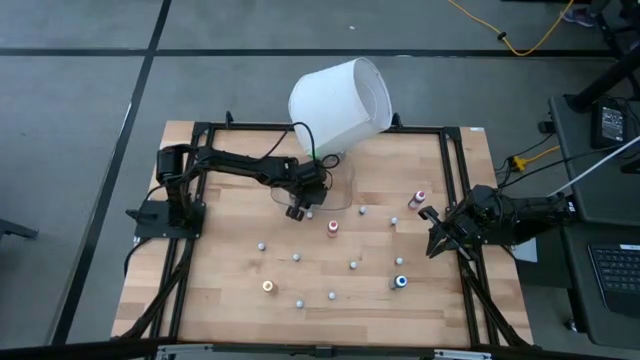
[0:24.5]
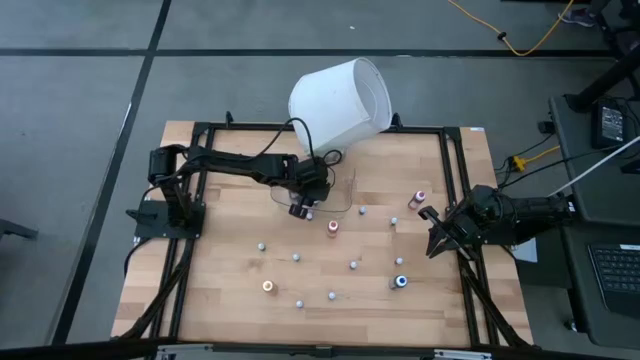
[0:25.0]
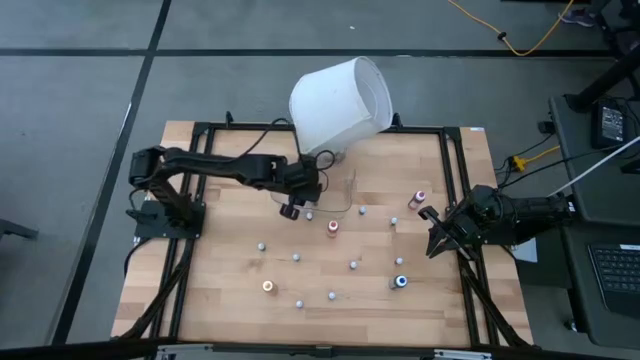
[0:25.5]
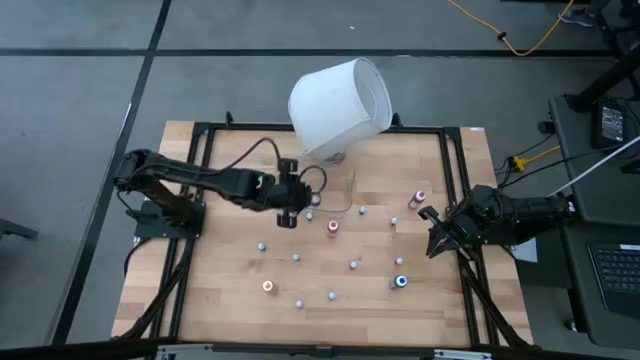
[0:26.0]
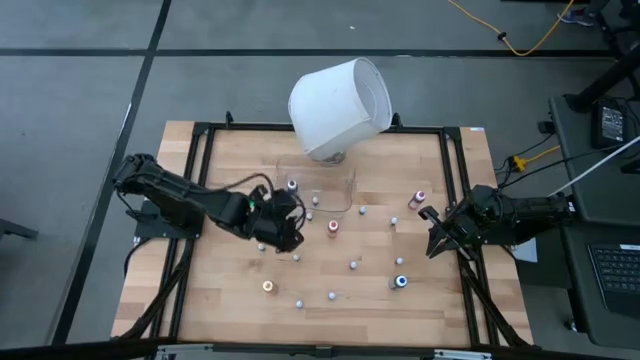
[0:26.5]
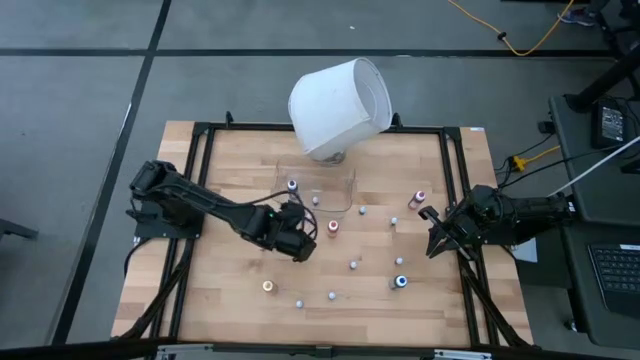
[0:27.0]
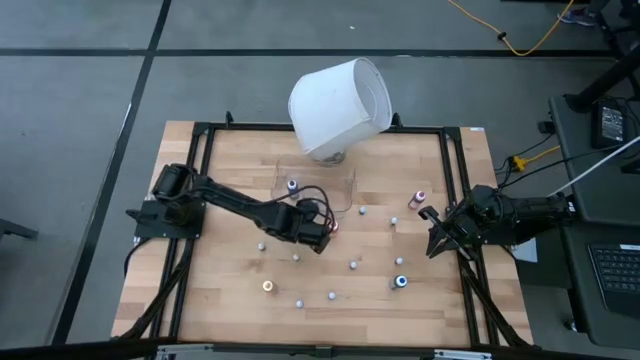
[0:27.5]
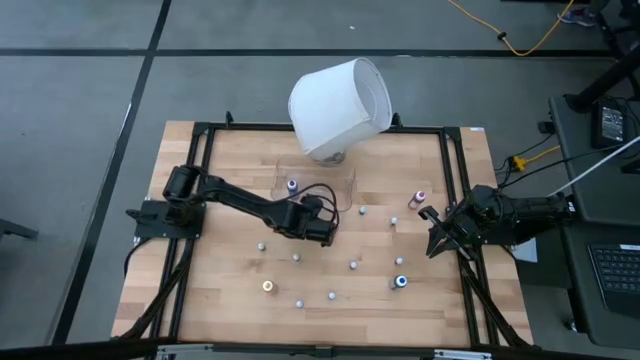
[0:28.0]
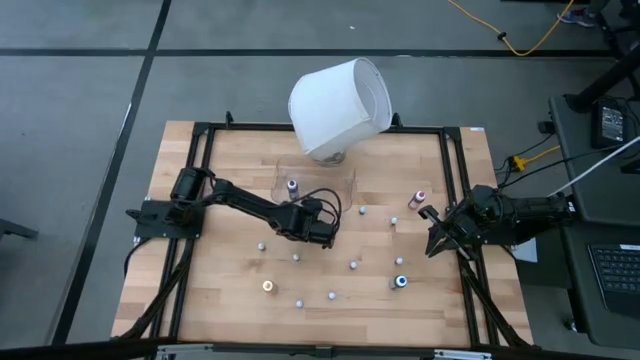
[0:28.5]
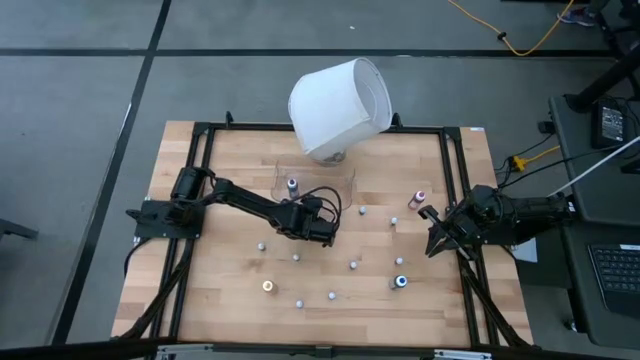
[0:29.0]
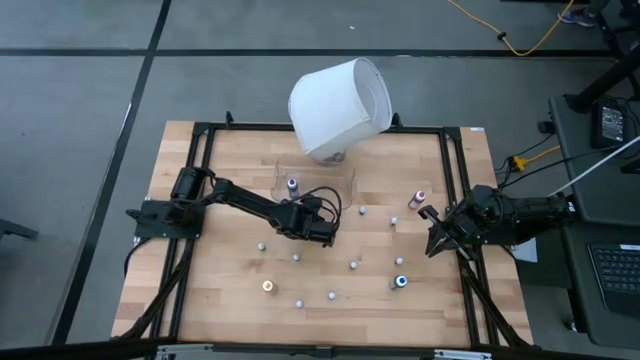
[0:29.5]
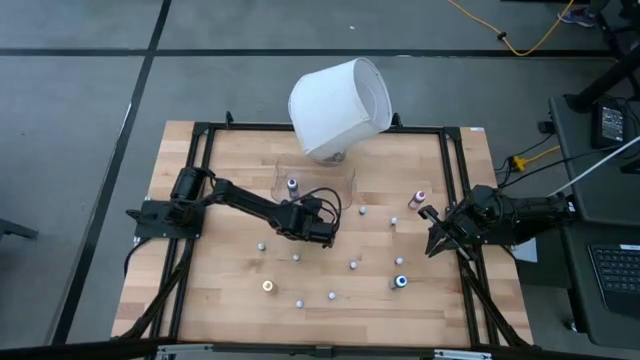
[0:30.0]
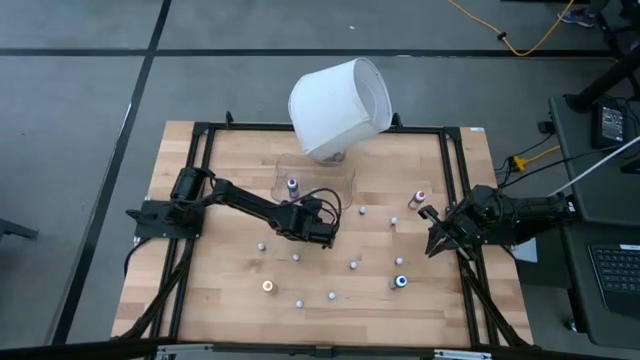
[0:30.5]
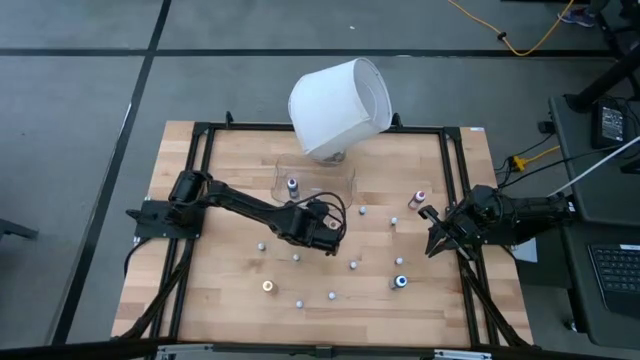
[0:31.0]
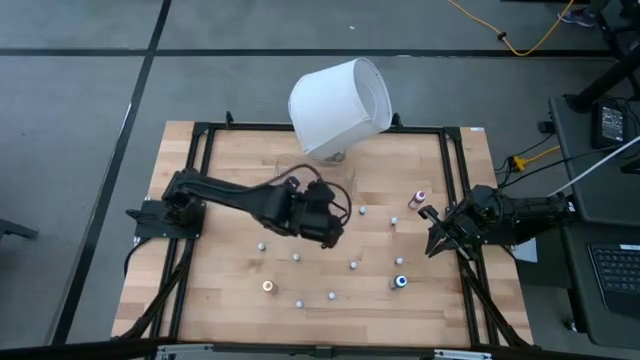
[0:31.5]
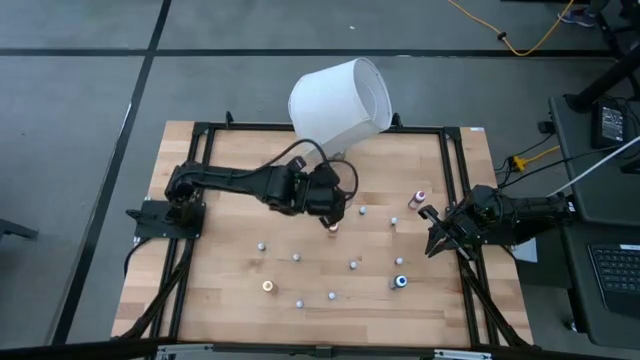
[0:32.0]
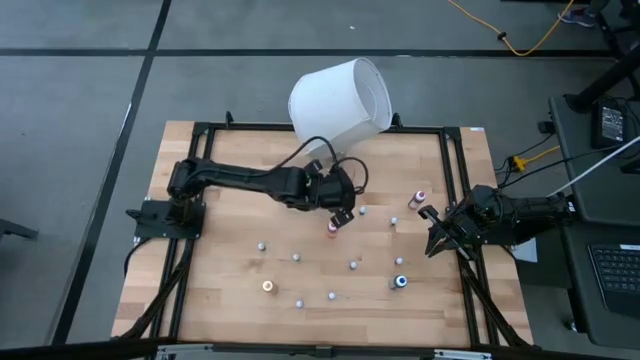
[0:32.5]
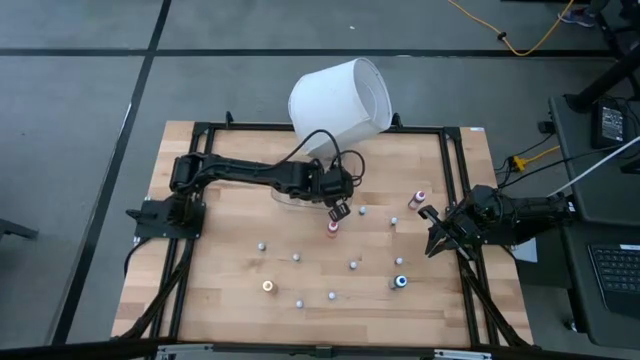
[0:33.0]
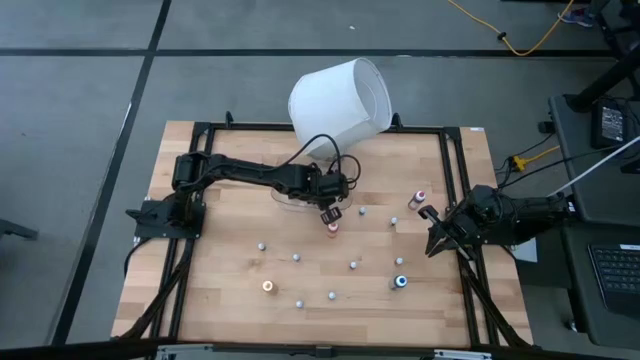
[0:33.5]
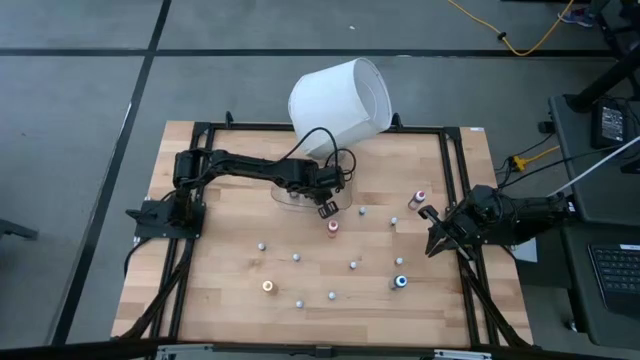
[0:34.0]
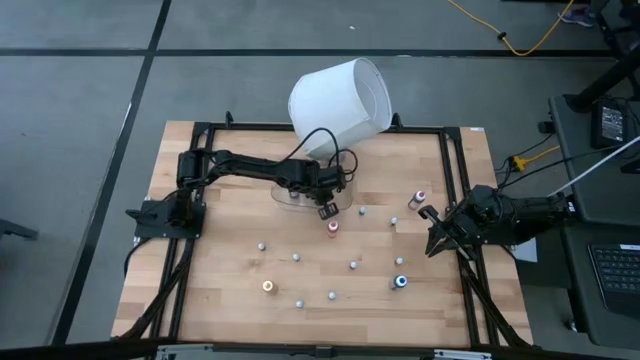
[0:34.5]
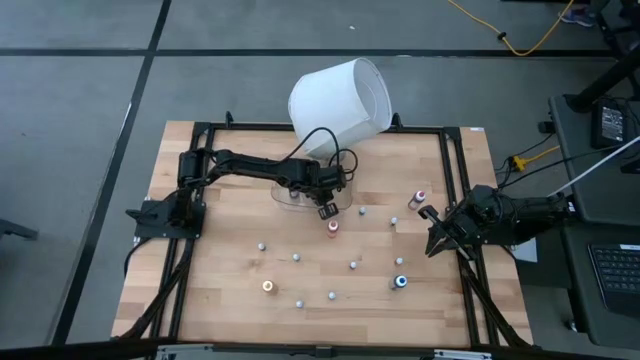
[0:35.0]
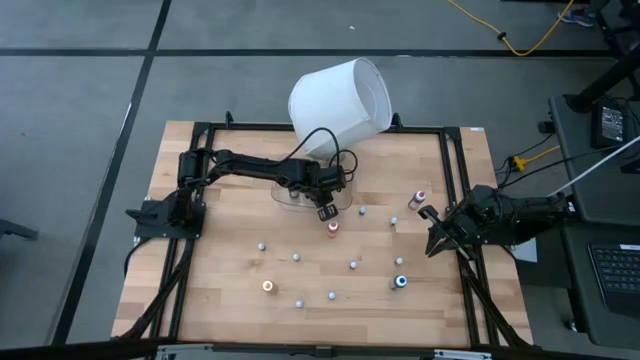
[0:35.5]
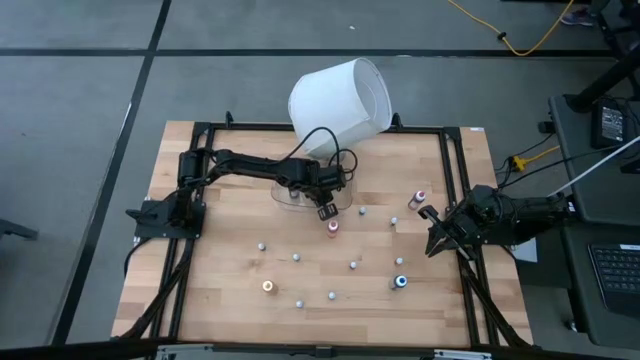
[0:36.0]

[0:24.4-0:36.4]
Task: Pick & Place food coloring
Put the top left small green food coloring bottle into the container

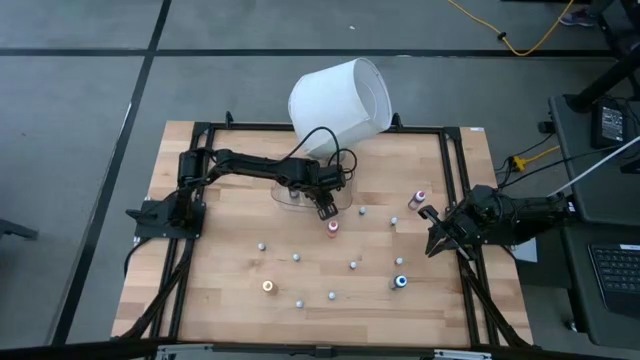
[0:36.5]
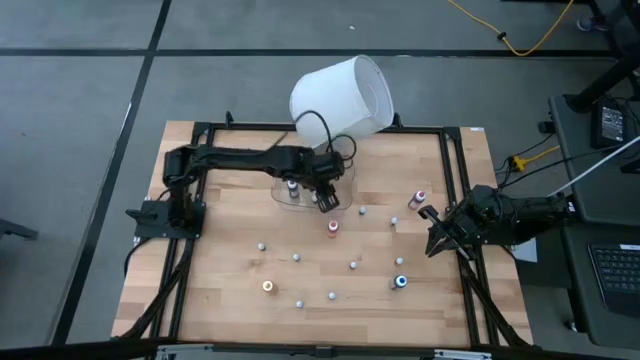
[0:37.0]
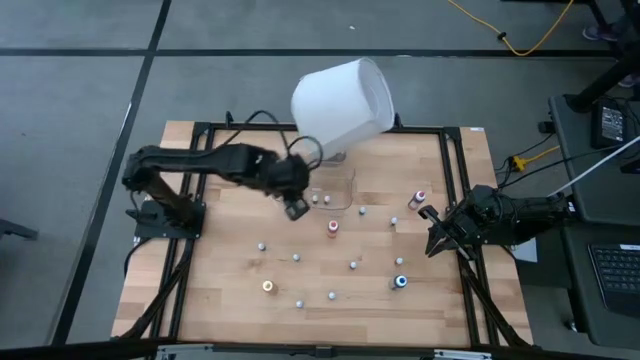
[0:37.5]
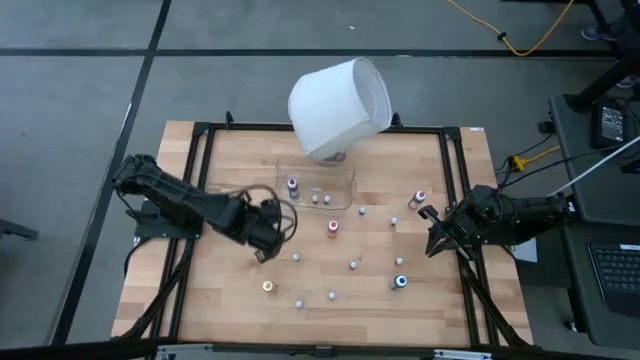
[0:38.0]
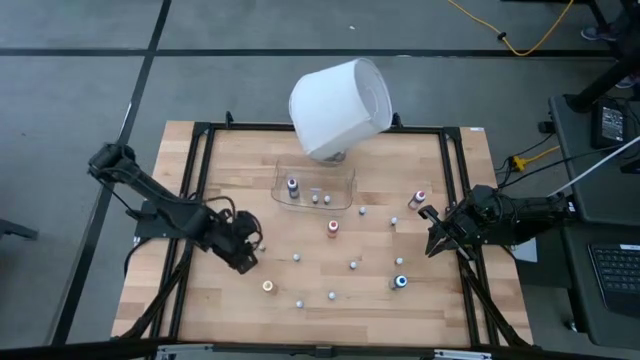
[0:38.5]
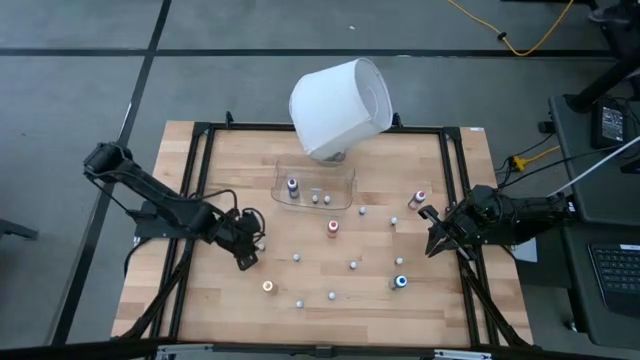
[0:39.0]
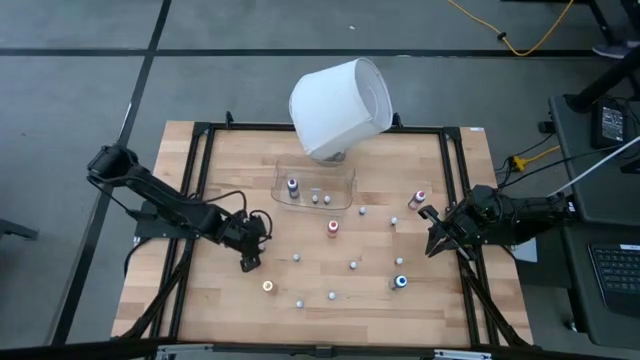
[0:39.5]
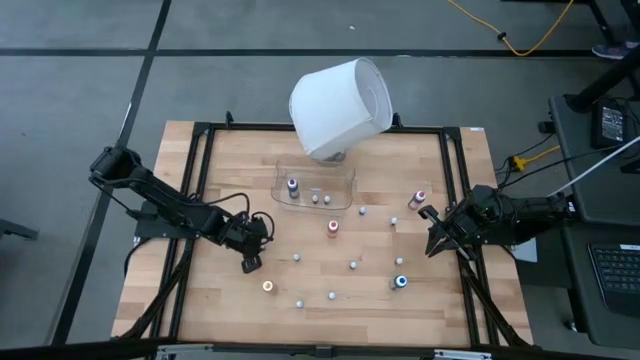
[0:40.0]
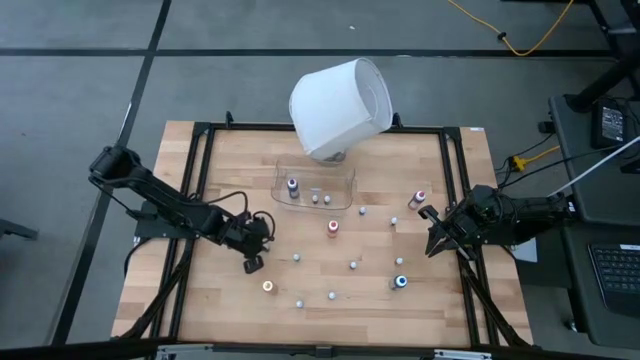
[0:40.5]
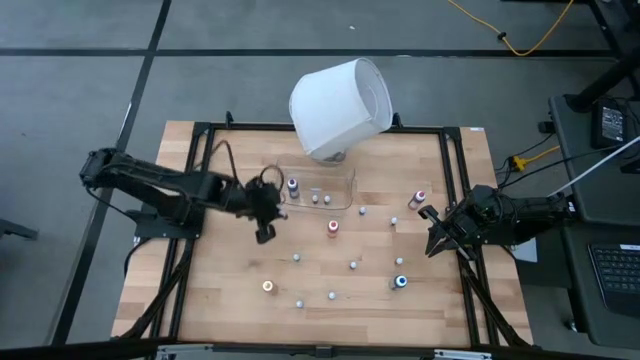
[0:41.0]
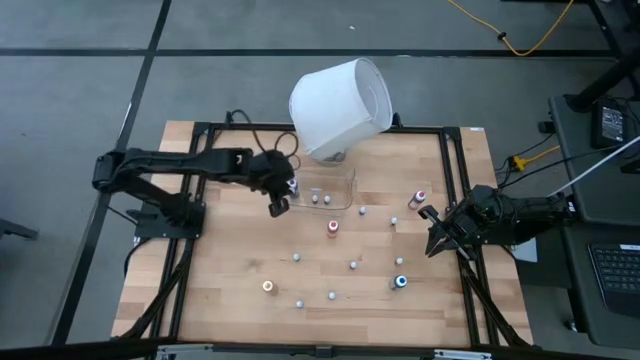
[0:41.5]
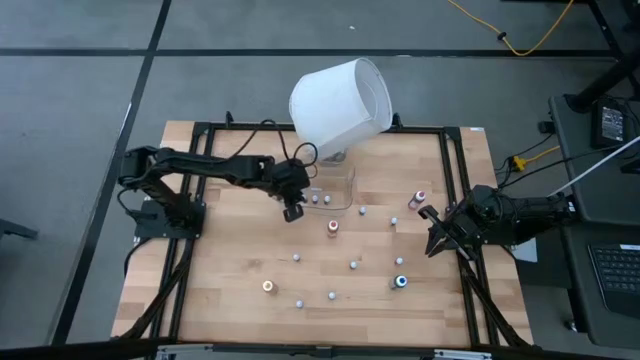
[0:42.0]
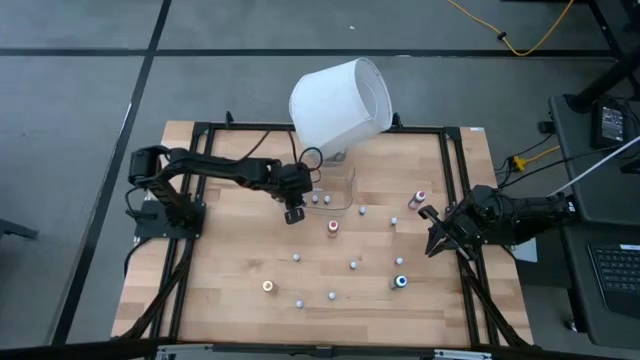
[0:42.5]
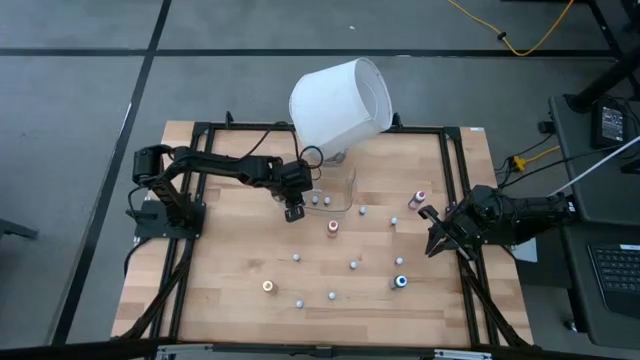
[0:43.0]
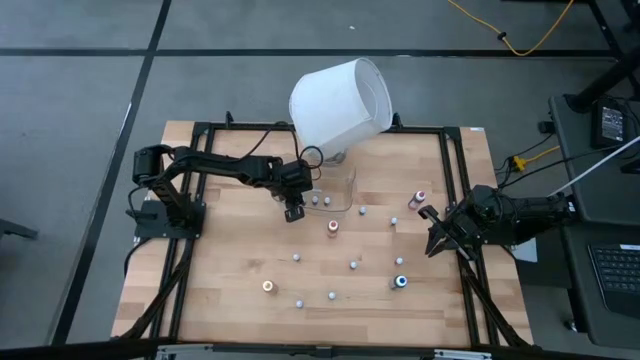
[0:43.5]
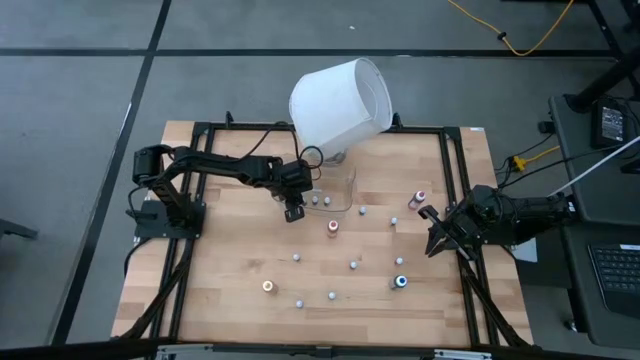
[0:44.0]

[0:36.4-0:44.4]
Put the bottom small green food coloring bottle into the container
